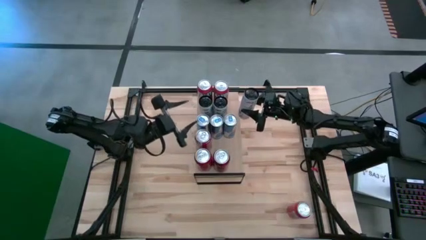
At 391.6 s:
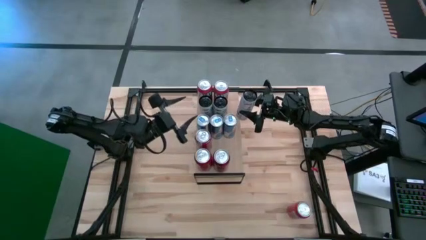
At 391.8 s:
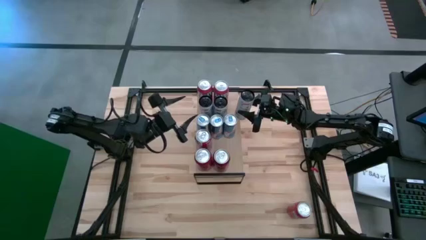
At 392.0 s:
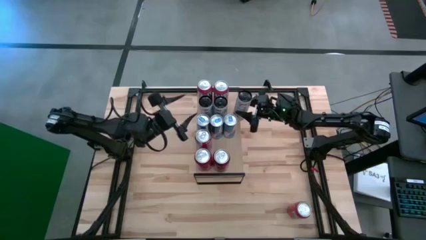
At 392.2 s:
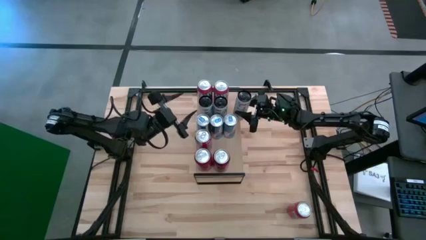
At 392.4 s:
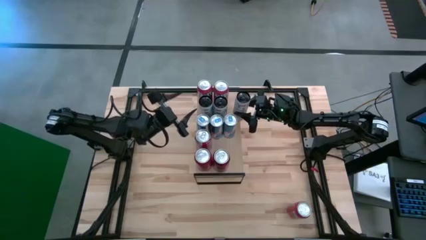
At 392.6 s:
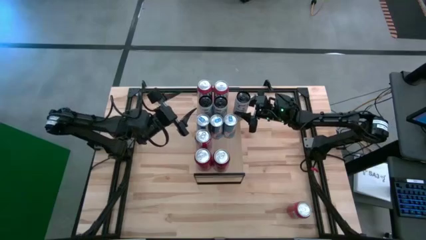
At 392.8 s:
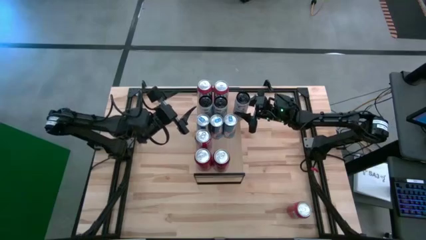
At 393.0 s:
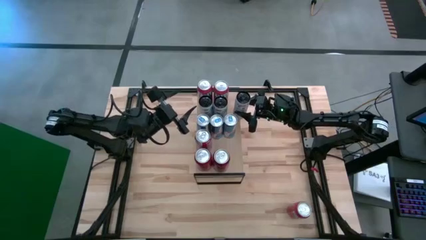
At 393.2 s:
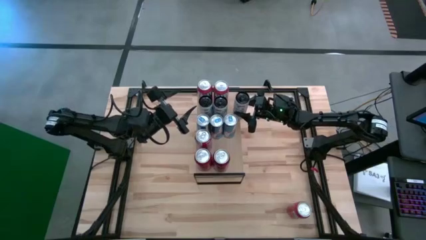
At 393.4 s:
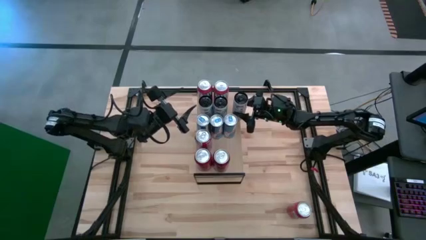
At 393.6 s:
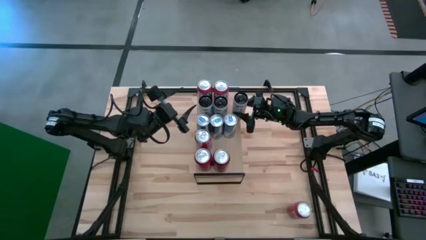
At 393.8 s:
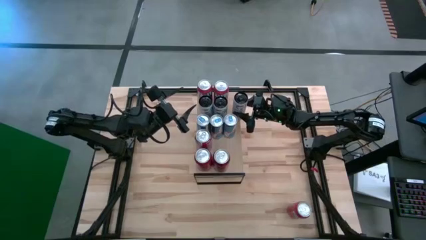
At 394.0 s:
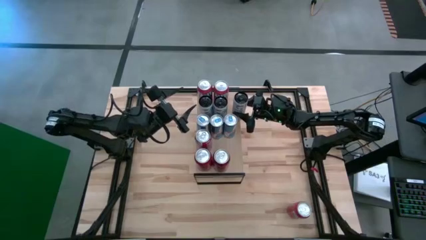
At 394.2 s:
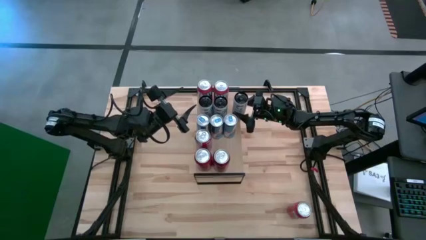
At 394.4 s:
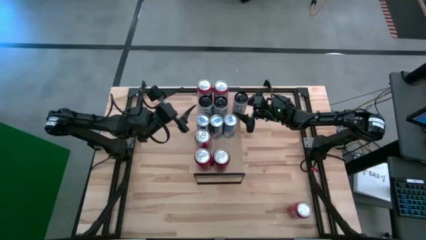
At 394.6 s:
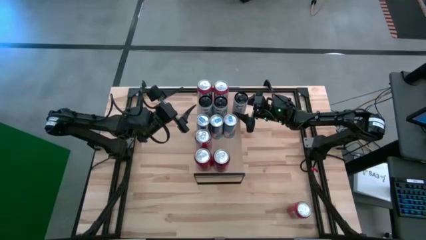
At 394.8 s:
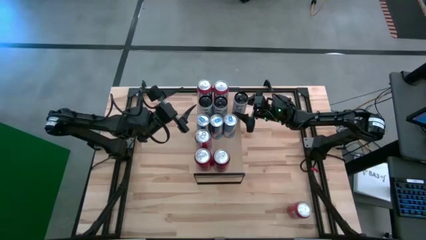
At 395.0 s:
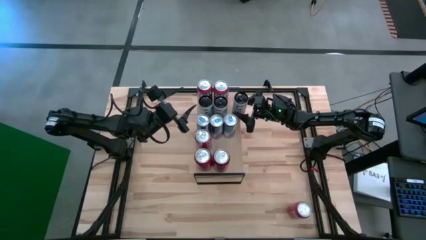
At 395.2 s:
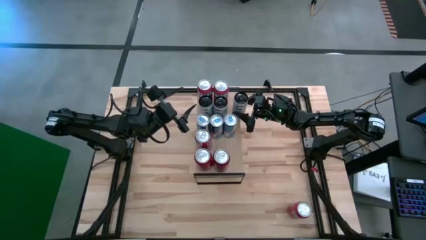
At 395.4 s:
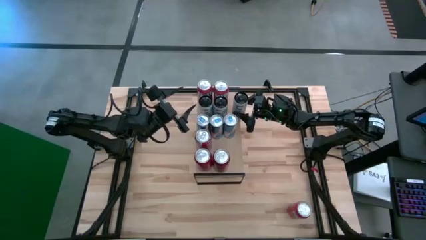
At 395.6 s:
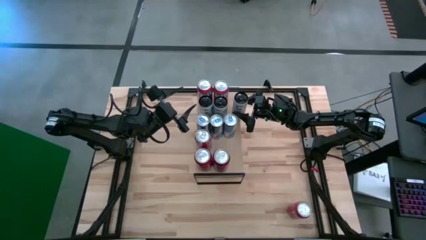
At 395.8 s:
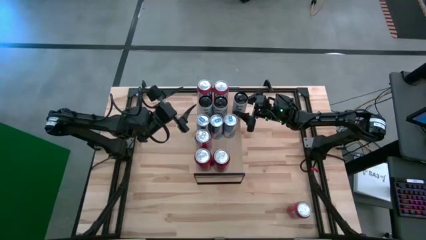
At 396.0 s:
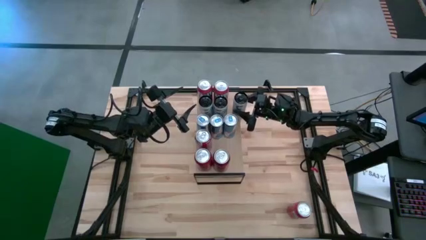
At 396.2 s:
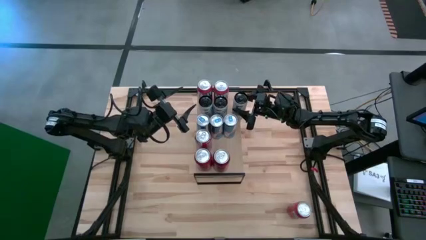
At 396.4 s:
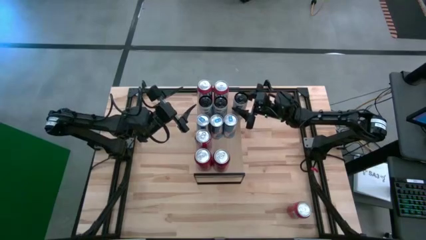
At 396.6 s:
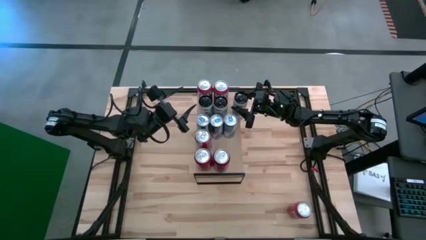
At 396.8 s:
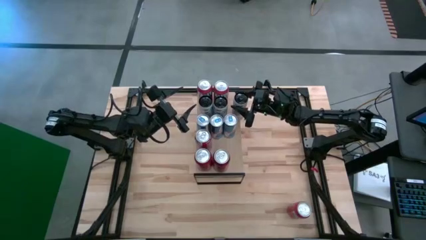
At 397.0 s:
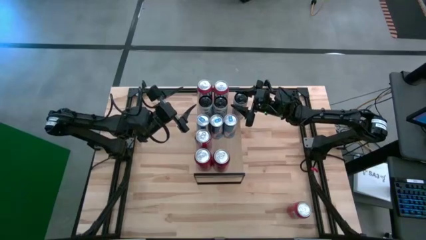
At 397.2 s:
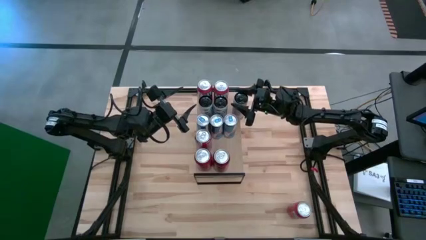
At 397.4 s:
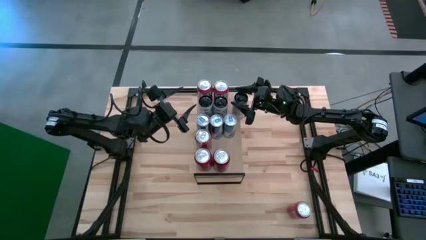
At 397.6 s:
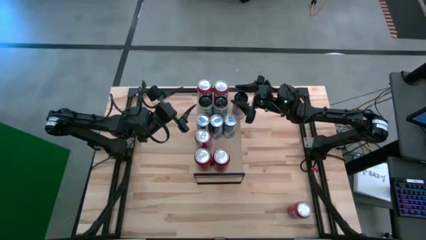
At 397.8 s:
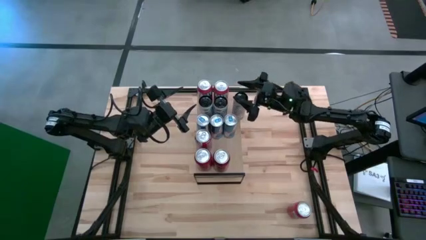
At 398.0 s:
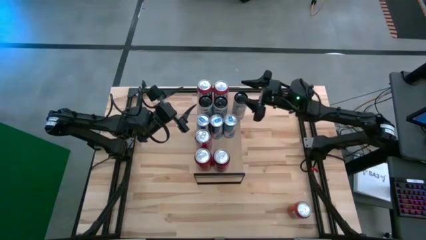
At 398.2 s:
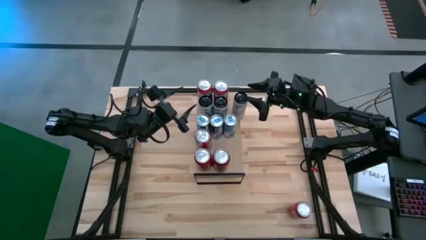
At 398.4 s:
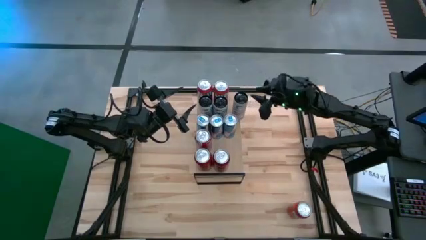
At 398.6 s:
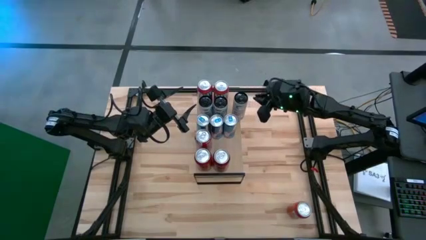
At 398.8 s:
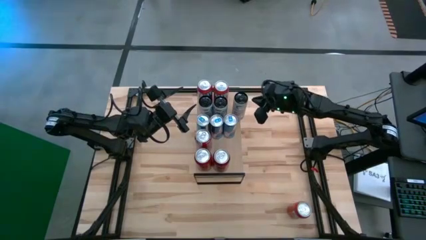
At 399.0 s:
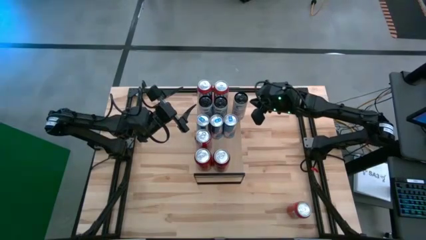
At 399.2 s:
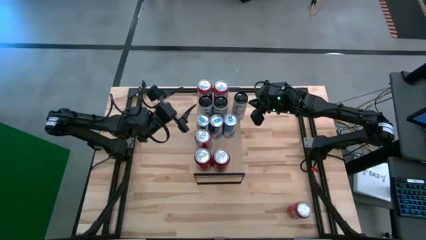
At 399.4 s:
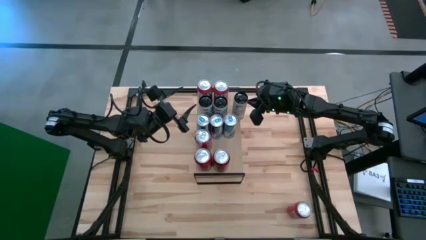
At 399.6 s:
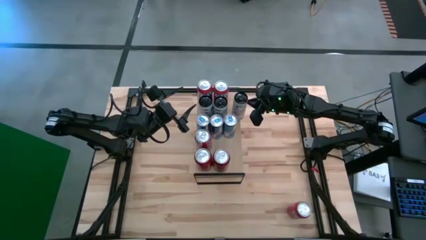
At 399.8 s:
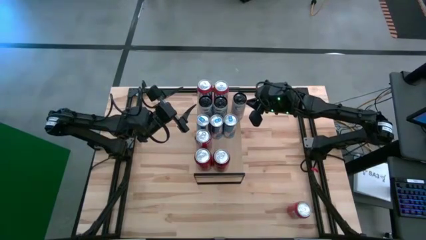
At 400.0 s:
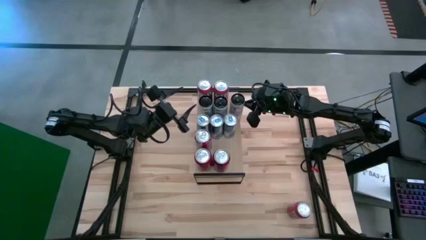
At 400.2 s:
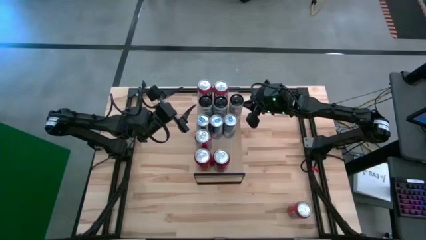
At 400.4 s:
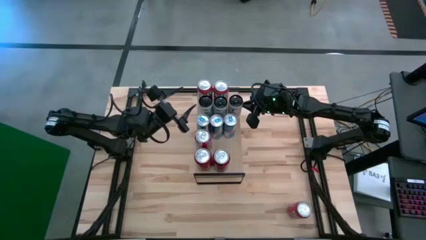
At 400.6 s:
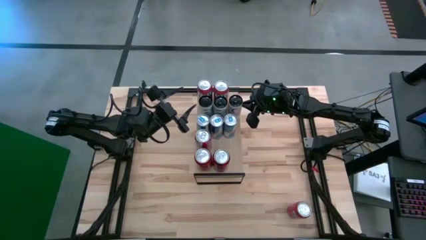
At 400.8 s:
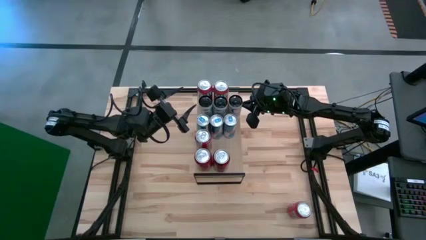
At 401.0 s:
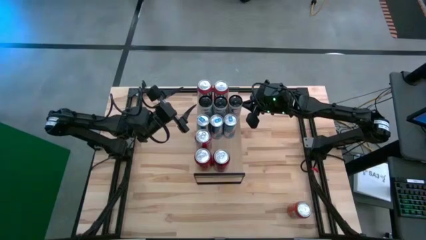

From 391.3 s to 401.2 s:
Task: Place canned beverage on shelf
Put the white pink soda can on the shelf aligned with the other white pink soda cans
